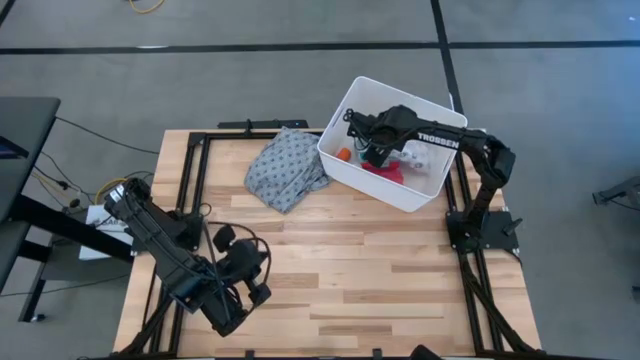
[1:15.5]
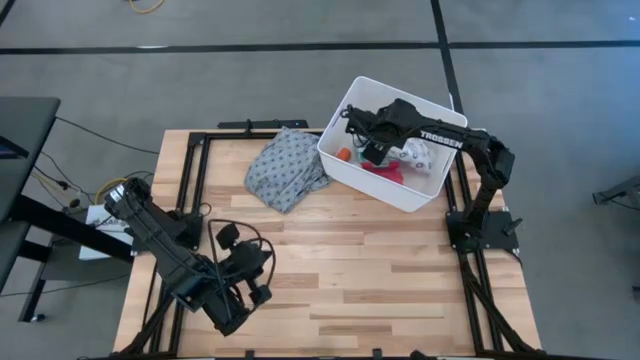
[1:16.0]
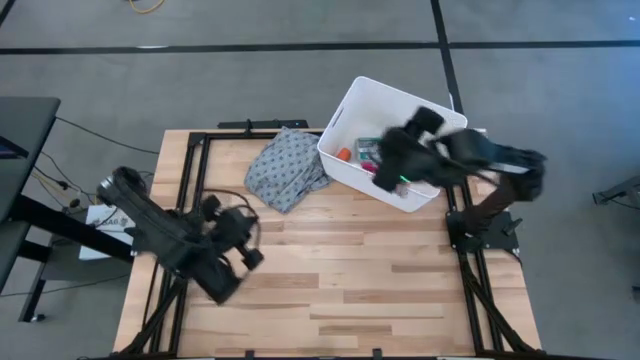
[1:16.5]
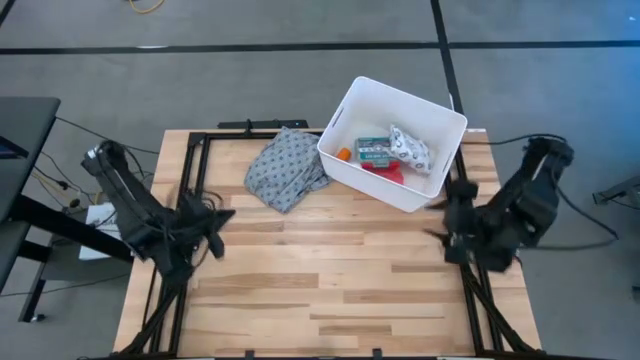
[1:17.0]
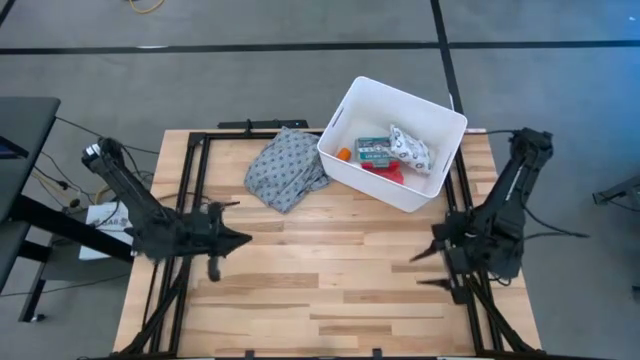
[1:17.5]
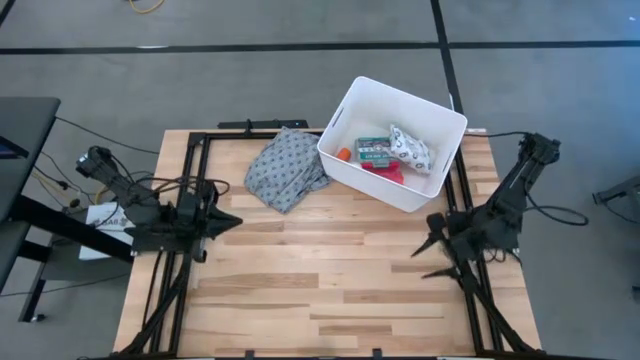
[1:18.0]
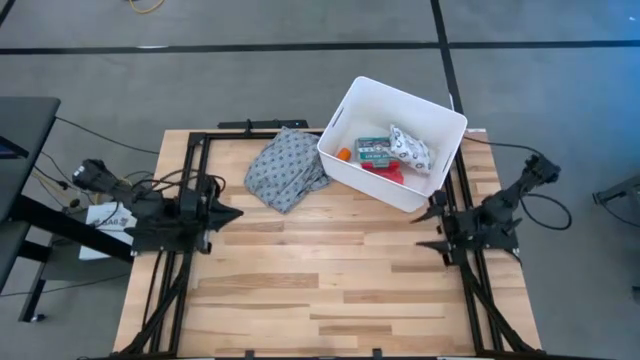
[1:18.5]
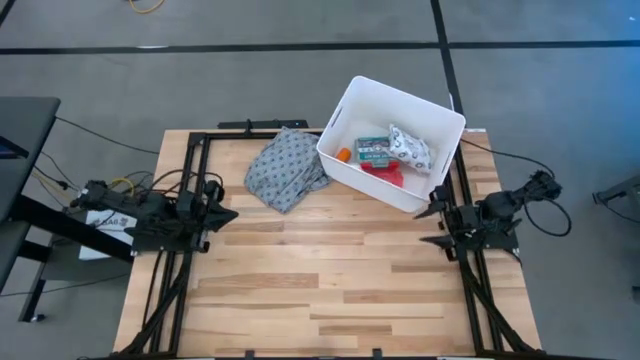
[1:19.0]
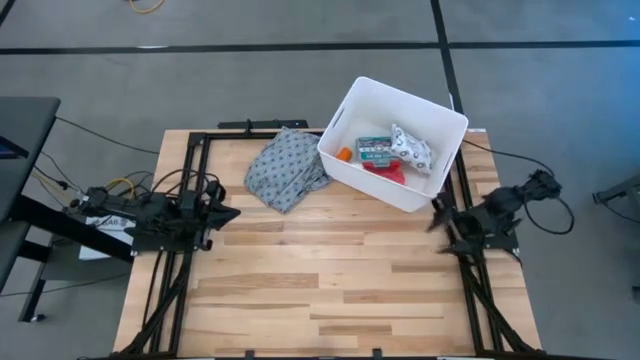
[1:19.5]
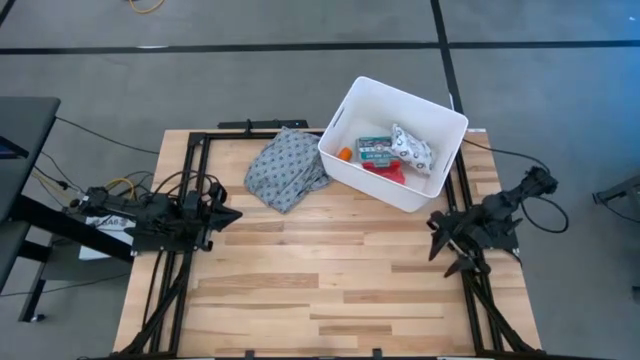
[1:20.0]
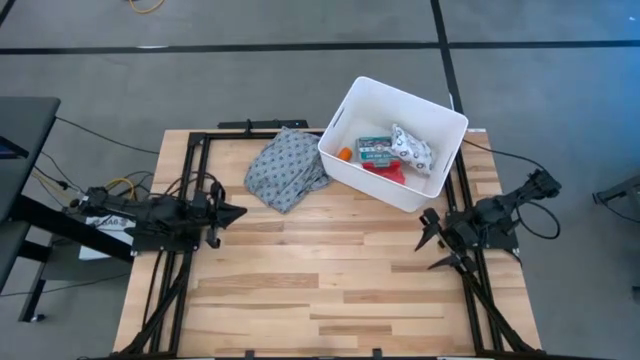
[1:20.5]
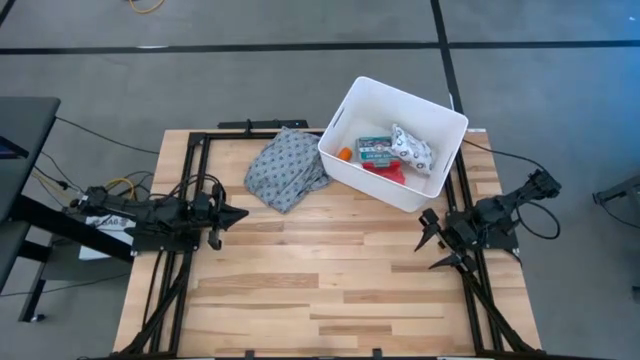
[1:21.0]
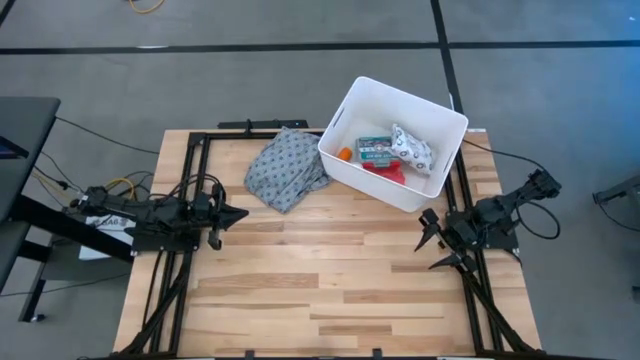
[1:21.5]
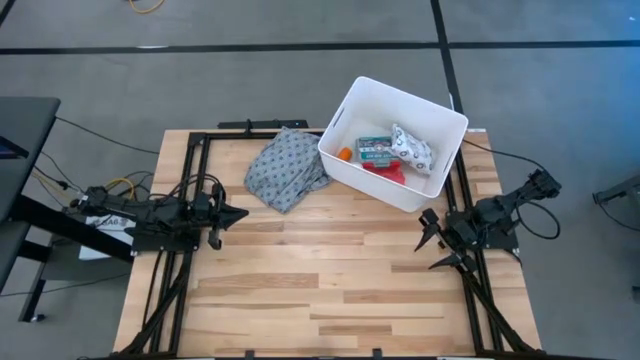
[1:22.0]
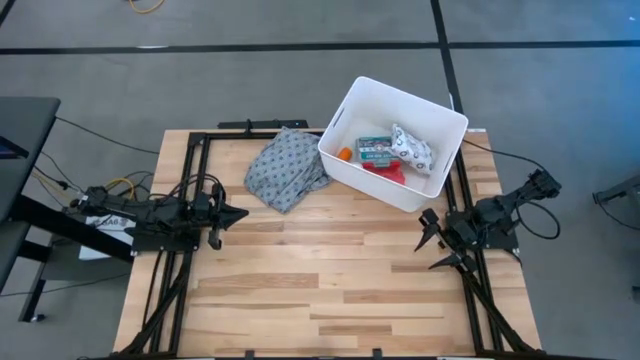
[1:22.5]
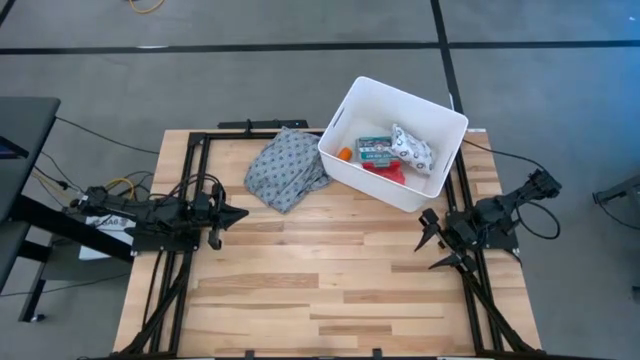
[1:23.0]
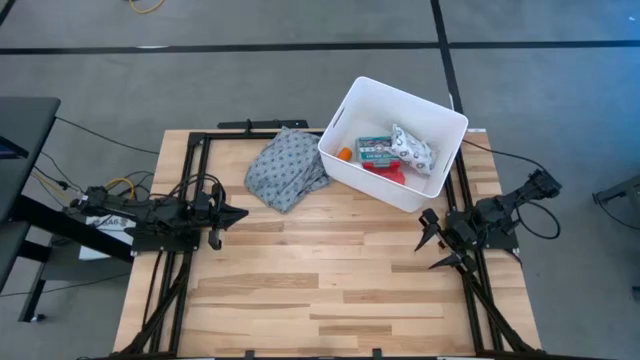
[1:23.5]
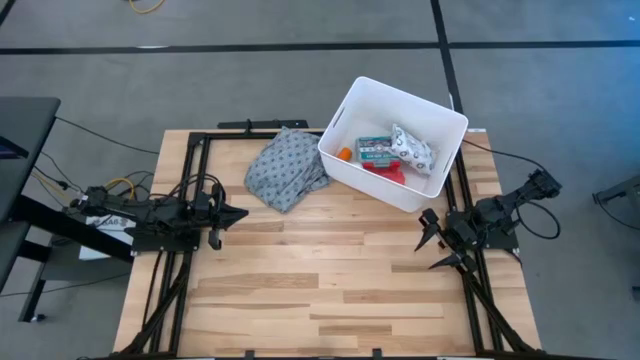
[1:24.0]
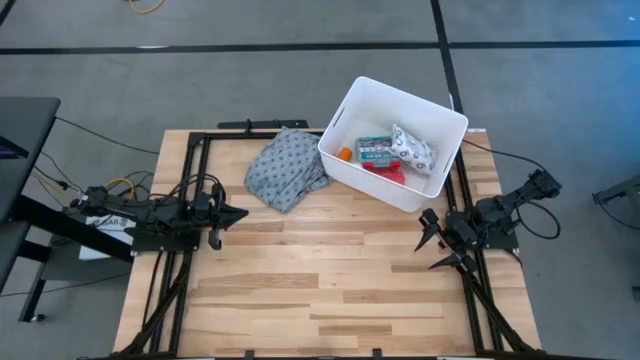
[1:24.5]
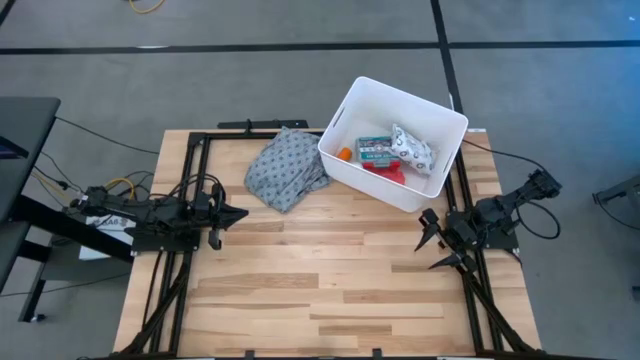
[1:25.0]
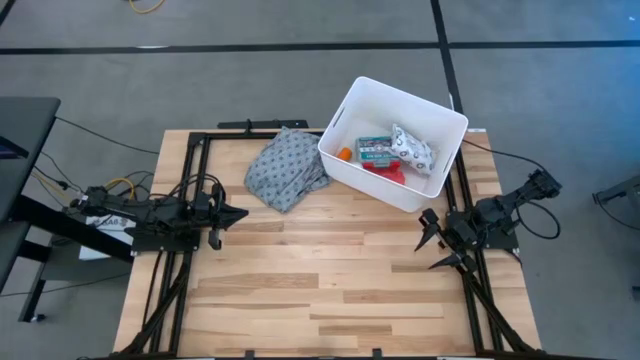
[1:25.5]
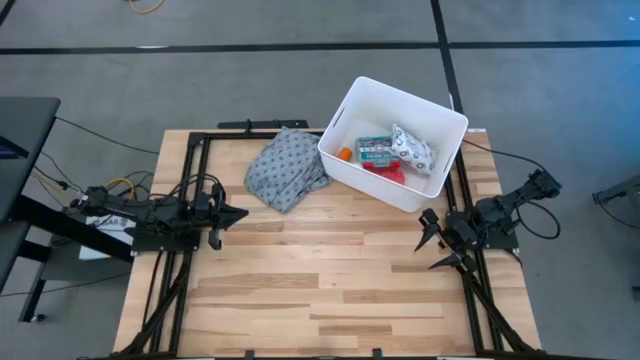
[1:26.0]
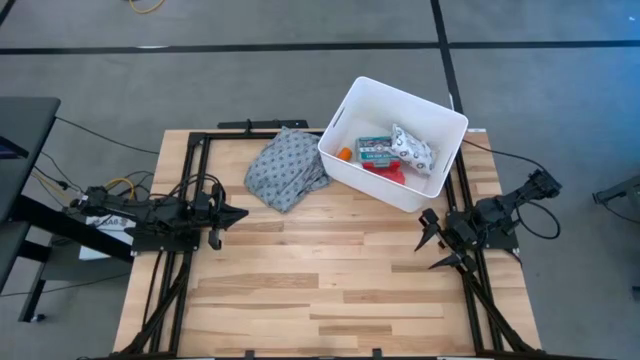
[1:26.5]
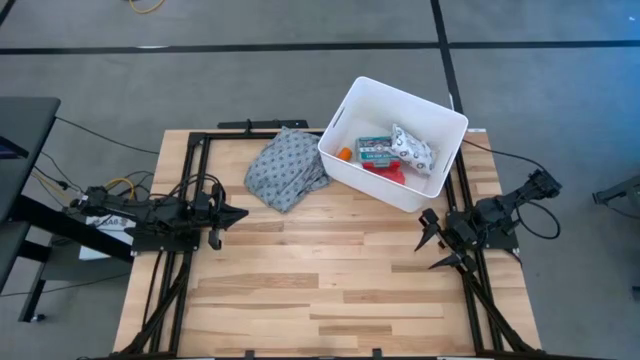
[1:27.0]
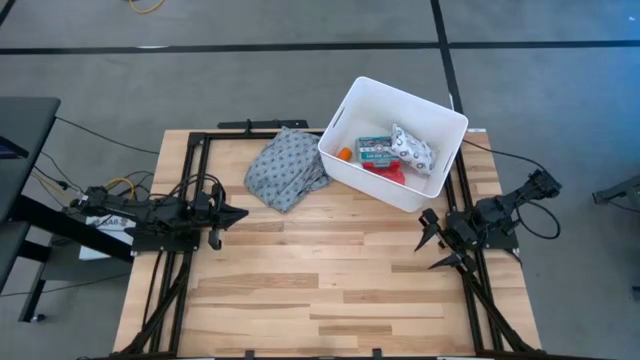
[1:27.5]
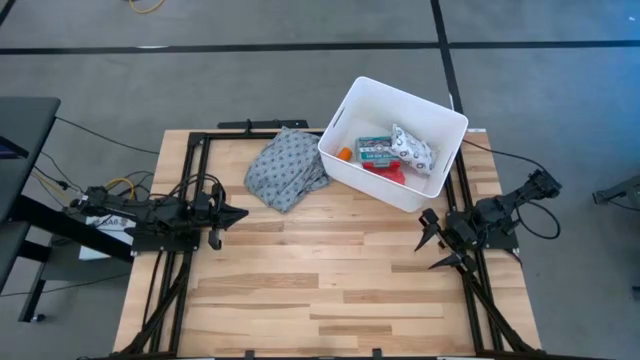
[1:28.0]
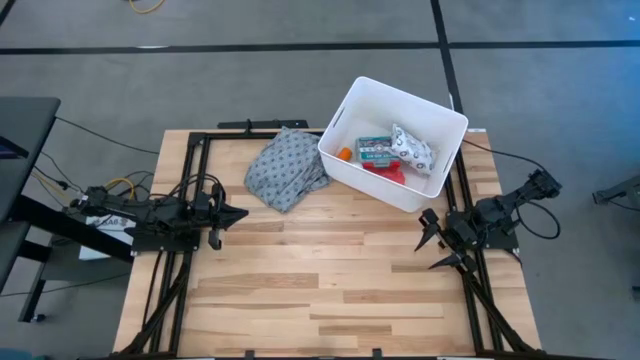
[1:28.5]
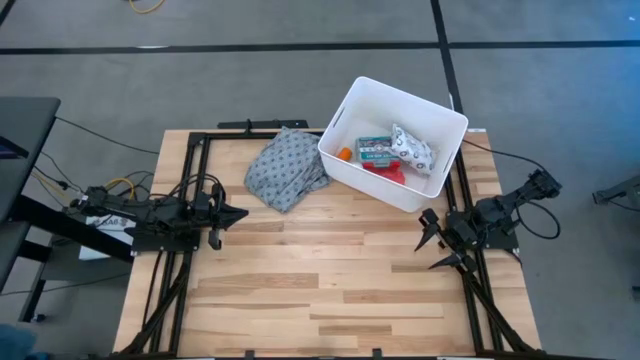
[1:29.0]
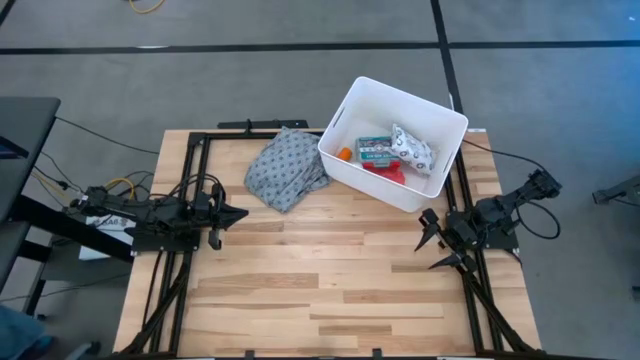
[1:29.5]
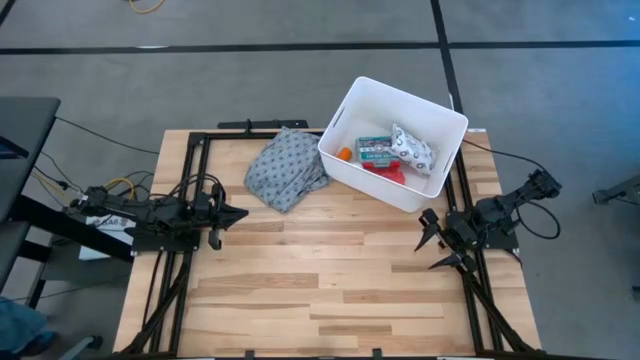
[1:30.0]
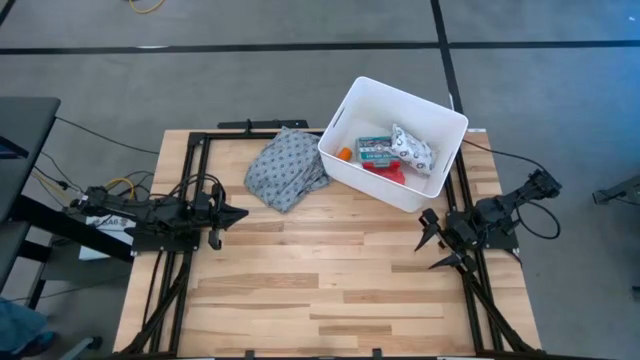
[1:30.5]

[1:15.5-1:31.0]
Task: Pick & place medical supplies in basket/bin
Return to Home Position

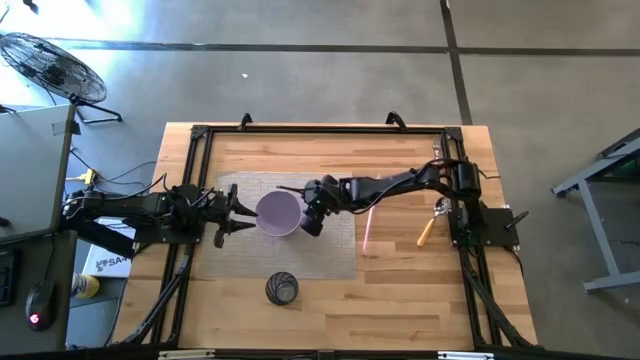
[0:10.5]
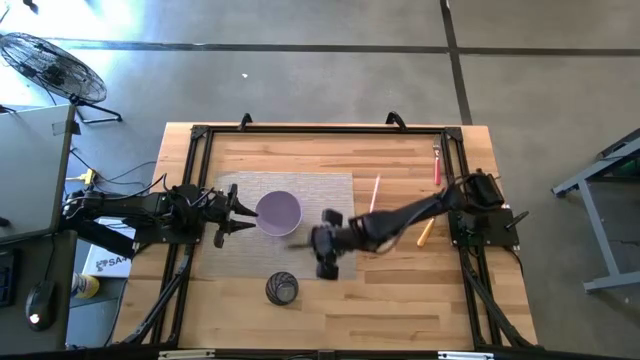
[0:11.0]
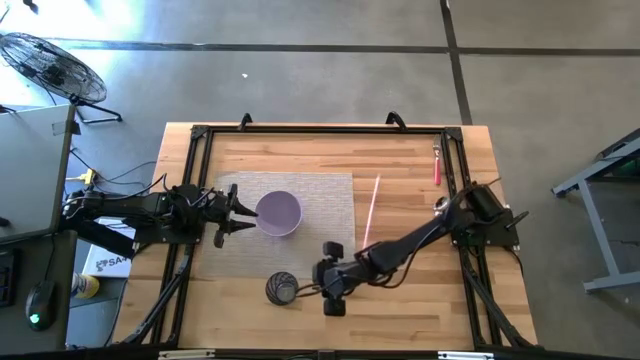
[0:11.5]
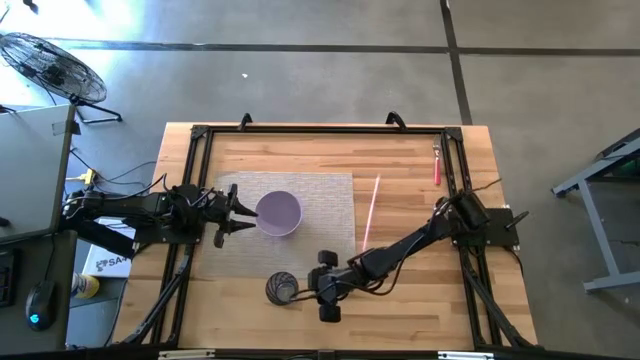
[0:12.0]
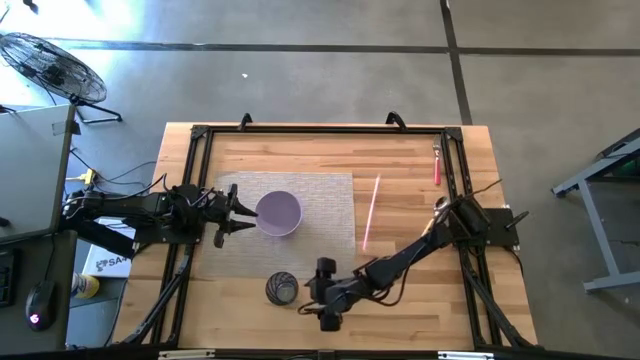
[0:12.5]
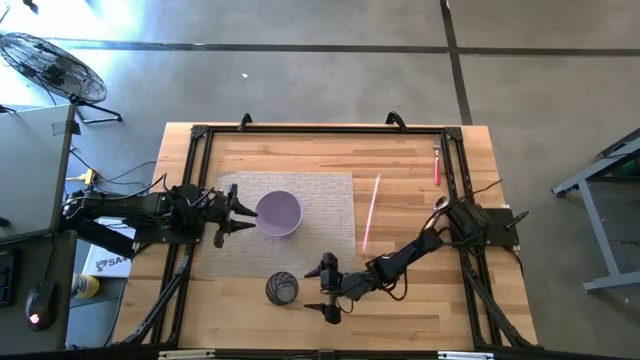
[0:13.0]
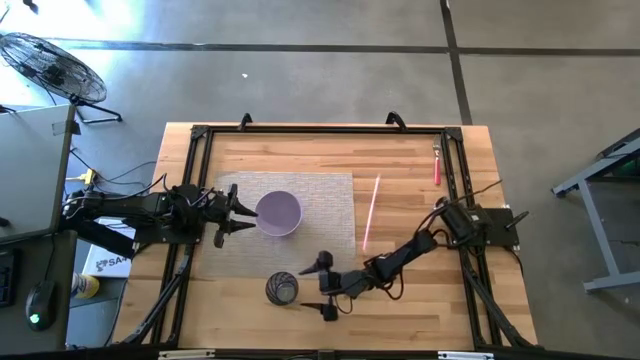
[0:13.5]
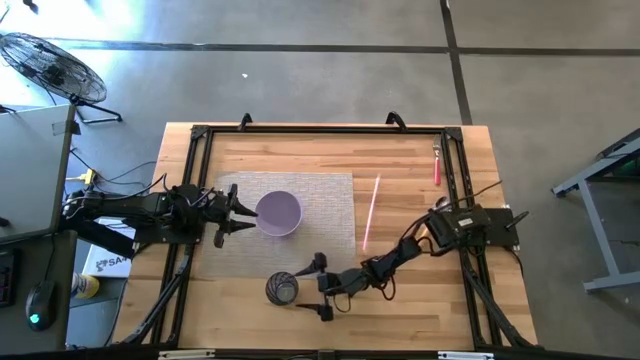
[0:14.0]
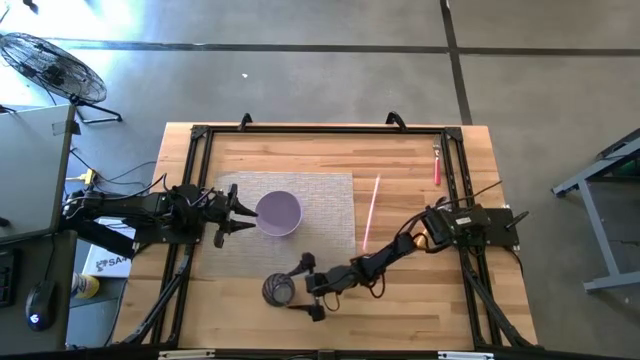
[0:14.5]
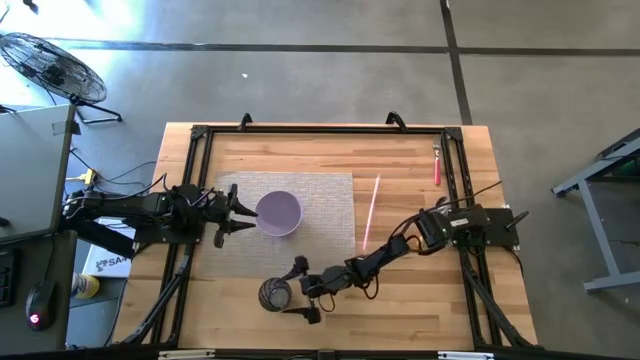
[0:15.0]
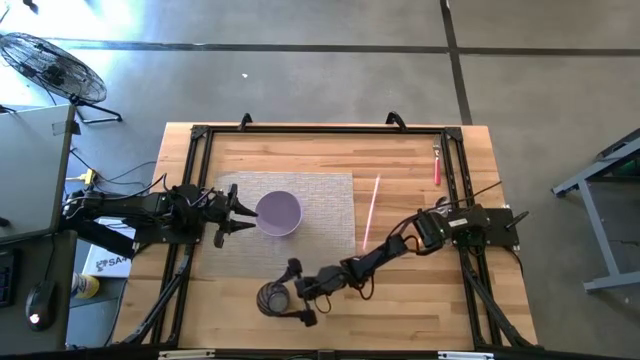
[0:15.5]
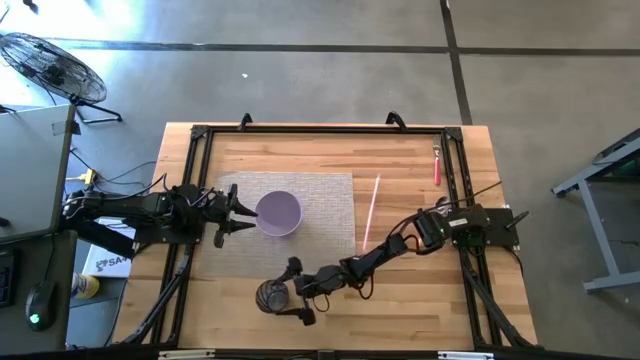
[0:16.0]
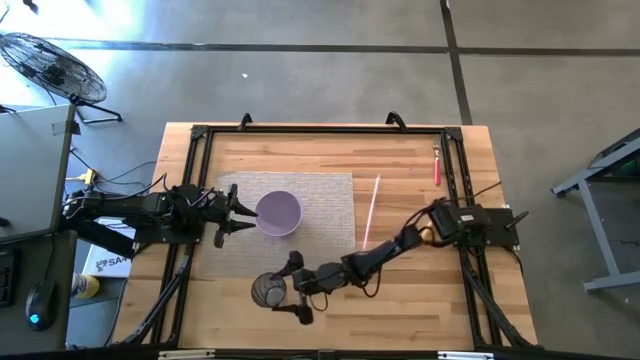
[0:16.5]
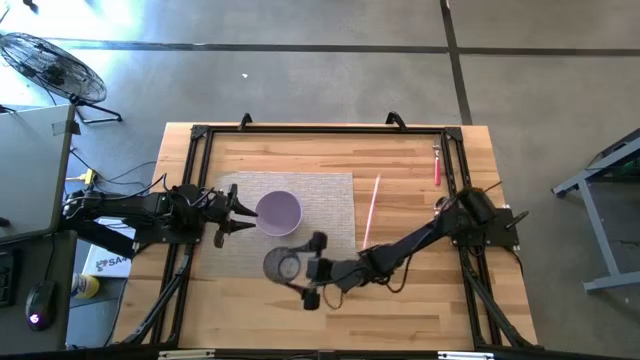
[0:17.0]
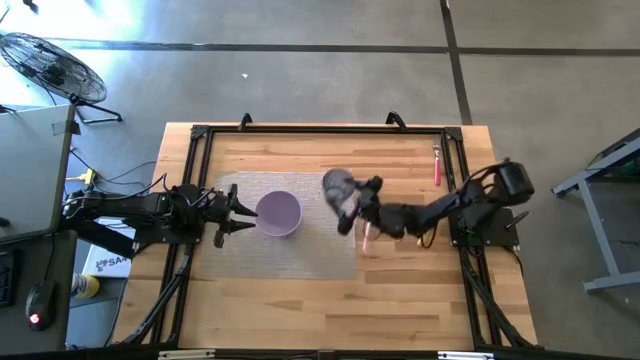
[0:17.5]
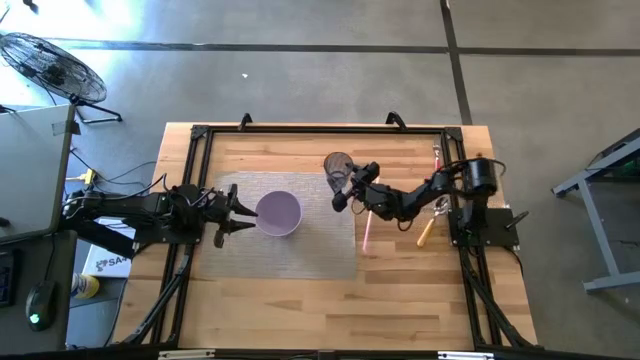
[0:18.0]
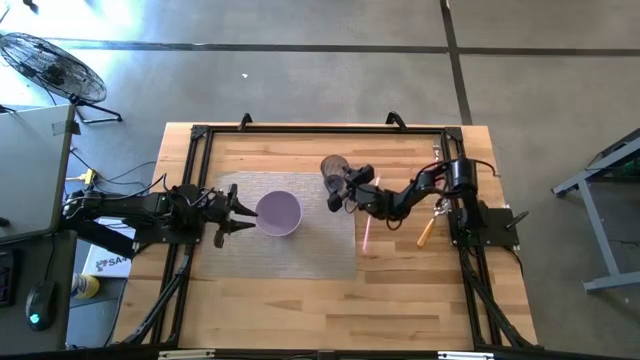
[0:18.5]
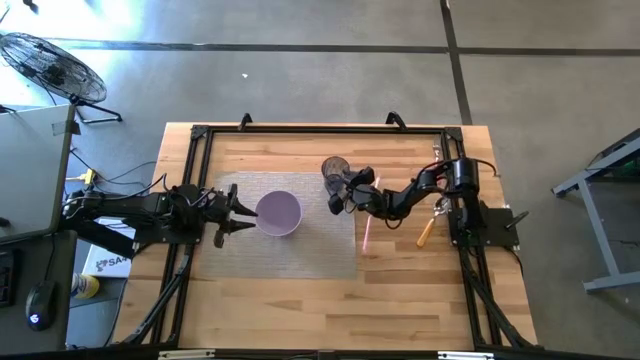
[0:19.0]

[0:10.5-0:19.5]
Task: Pick & Place Utensil
Put the blue cup on the gray placemat above the purple bowl
